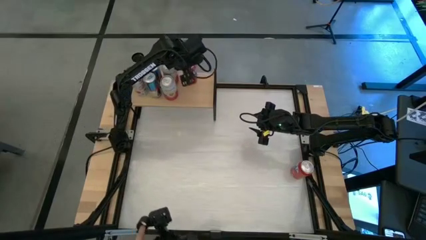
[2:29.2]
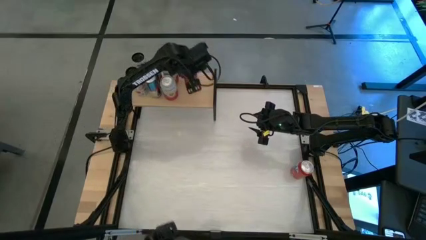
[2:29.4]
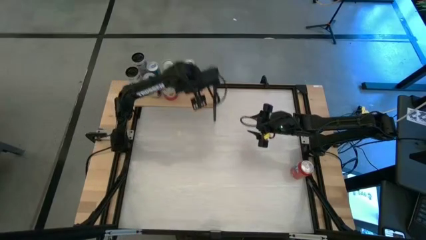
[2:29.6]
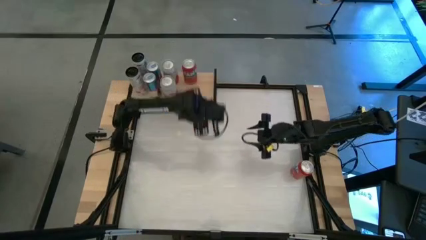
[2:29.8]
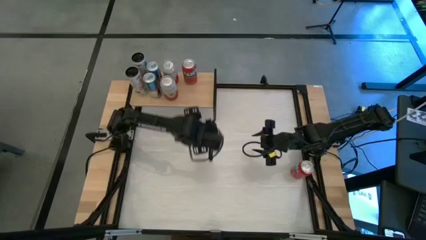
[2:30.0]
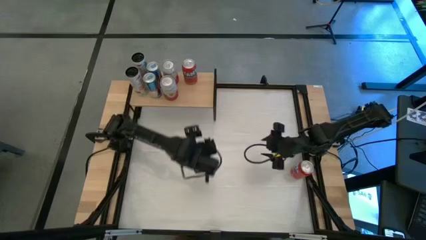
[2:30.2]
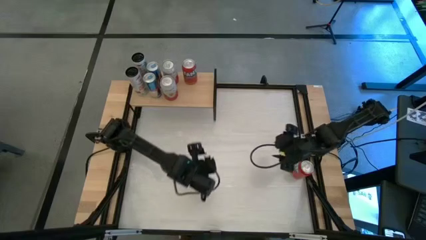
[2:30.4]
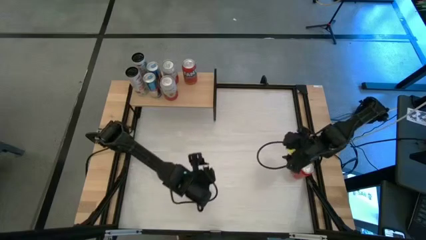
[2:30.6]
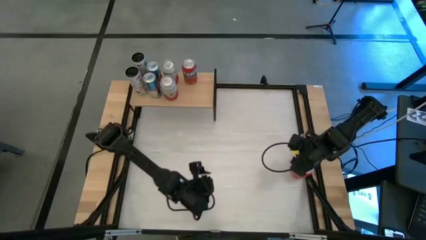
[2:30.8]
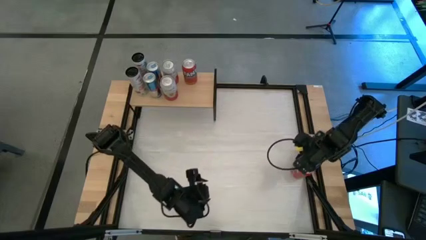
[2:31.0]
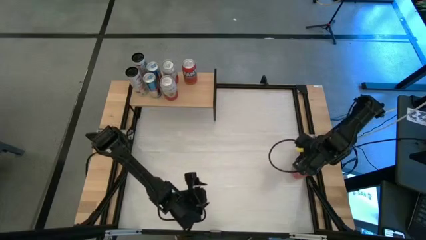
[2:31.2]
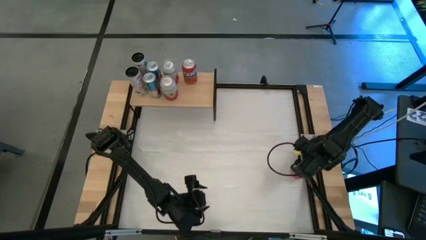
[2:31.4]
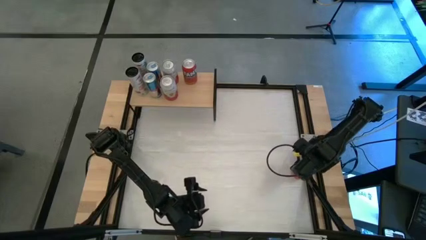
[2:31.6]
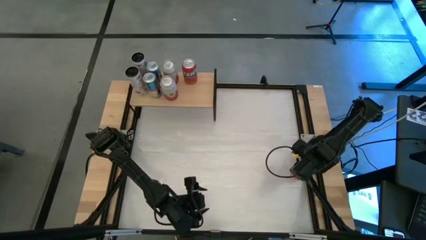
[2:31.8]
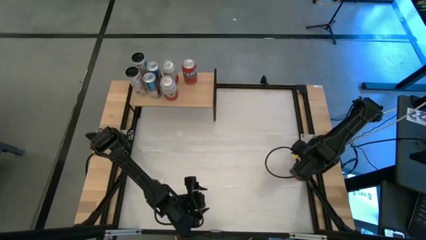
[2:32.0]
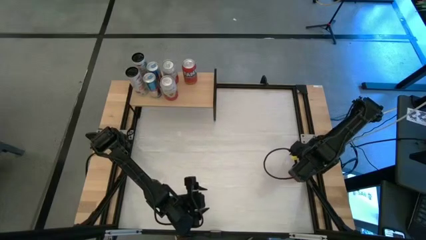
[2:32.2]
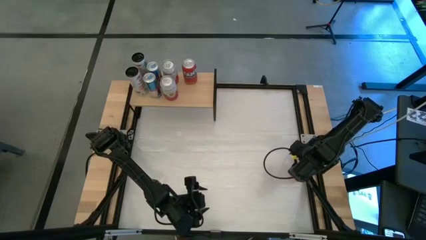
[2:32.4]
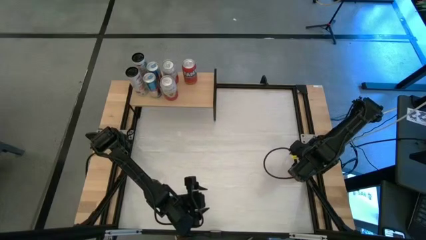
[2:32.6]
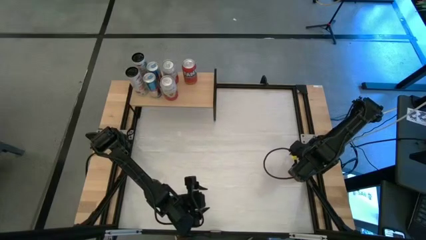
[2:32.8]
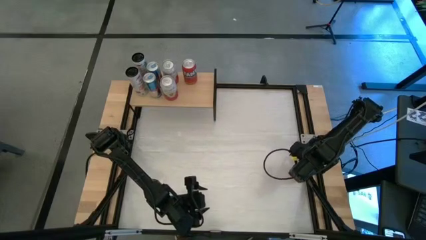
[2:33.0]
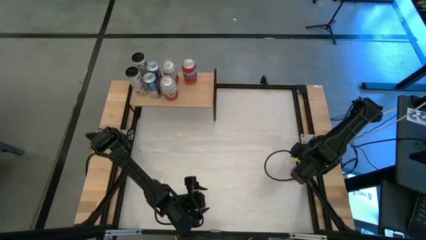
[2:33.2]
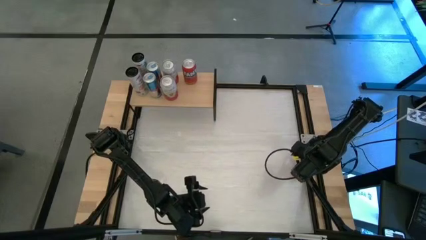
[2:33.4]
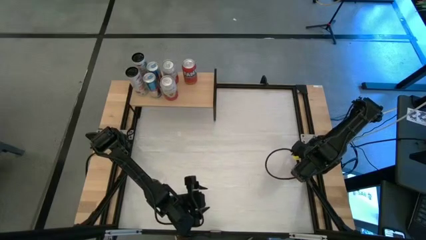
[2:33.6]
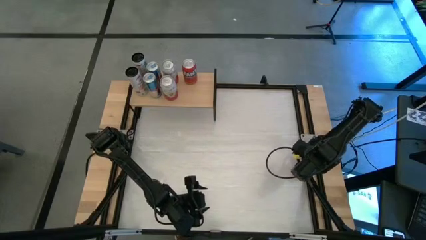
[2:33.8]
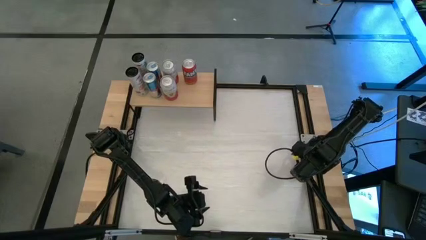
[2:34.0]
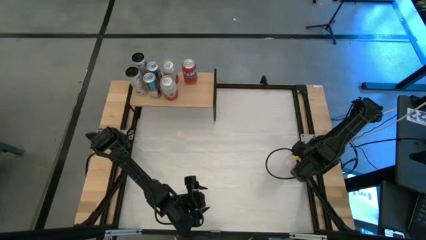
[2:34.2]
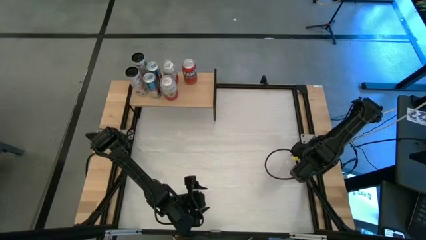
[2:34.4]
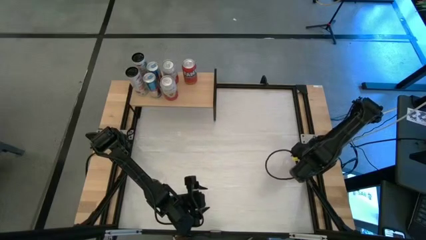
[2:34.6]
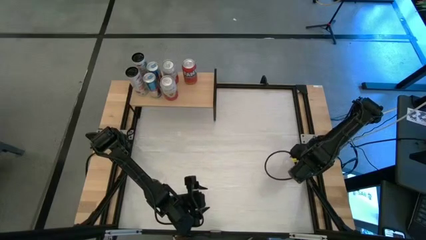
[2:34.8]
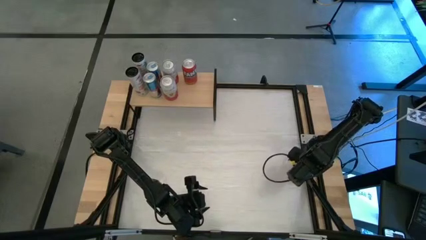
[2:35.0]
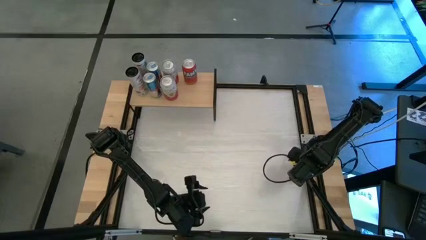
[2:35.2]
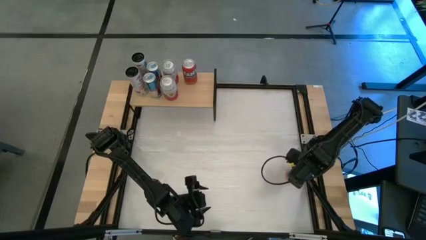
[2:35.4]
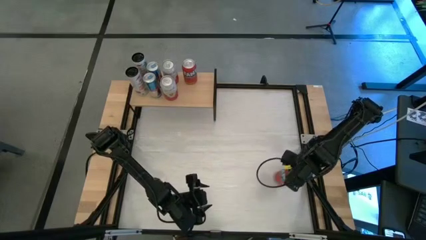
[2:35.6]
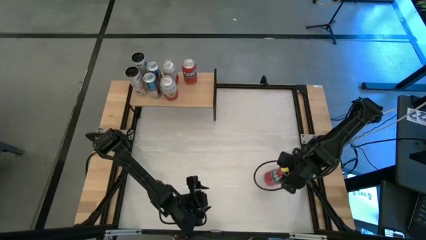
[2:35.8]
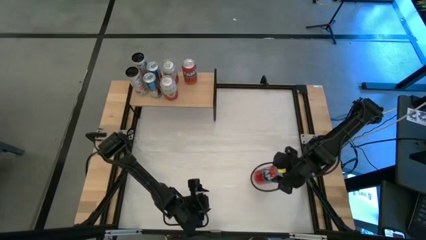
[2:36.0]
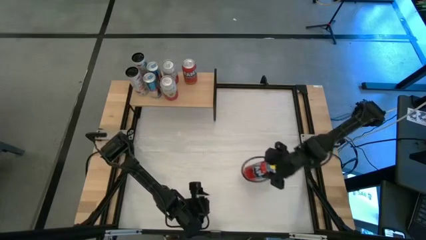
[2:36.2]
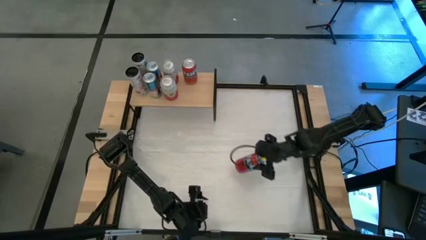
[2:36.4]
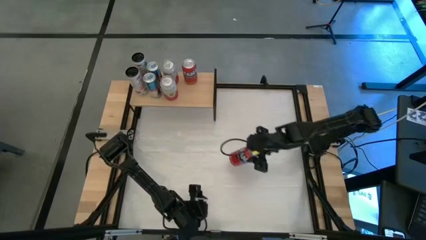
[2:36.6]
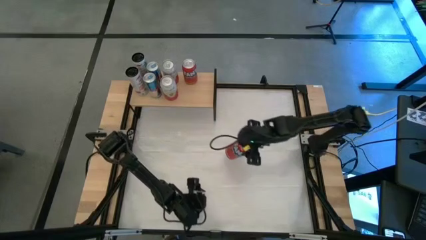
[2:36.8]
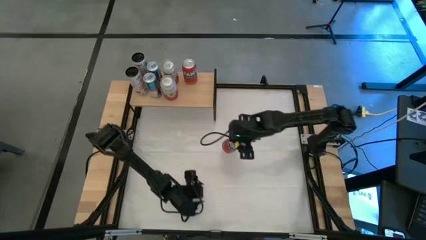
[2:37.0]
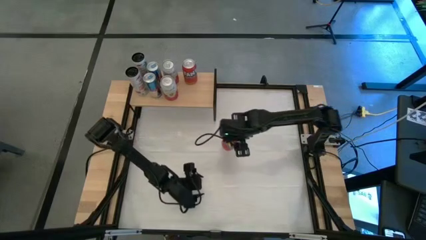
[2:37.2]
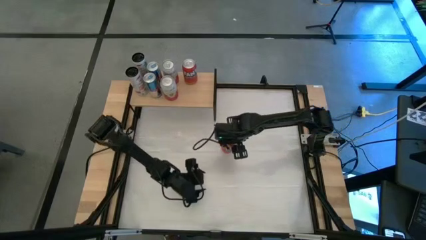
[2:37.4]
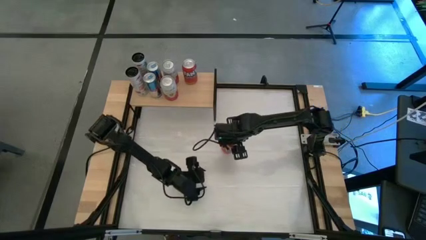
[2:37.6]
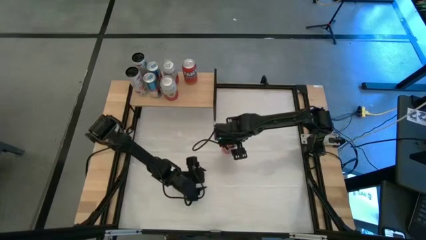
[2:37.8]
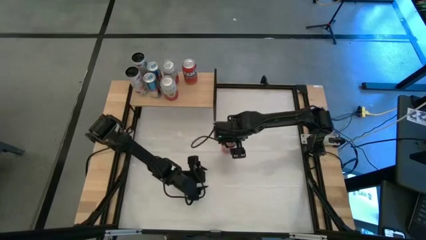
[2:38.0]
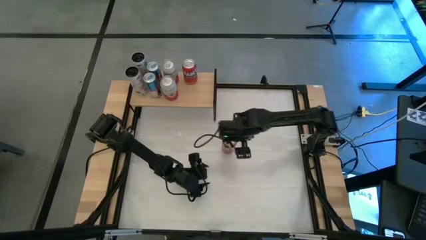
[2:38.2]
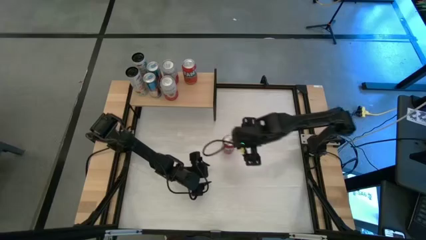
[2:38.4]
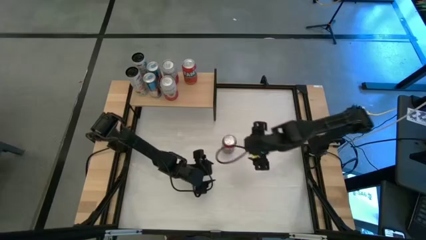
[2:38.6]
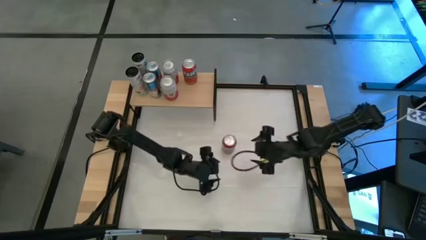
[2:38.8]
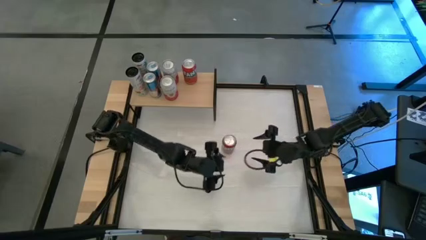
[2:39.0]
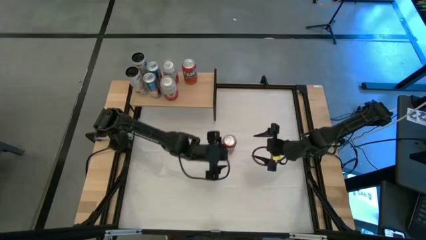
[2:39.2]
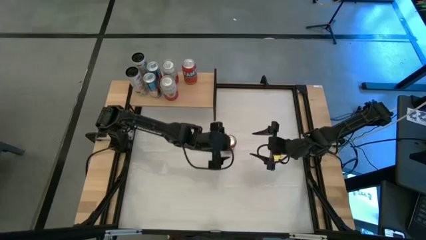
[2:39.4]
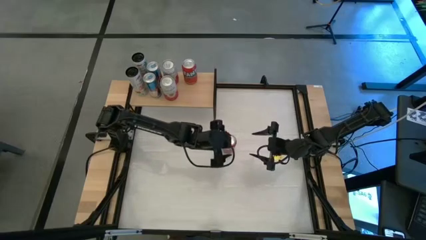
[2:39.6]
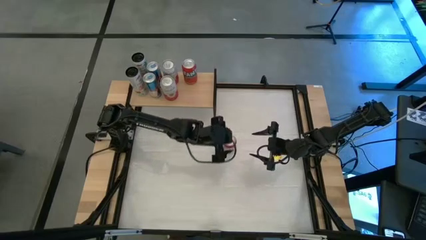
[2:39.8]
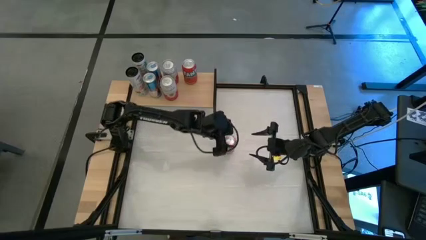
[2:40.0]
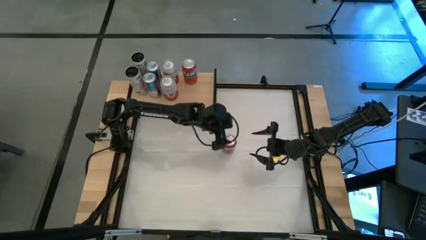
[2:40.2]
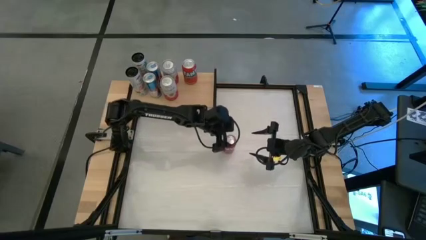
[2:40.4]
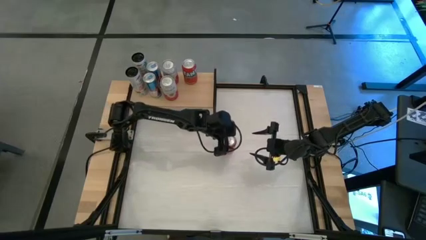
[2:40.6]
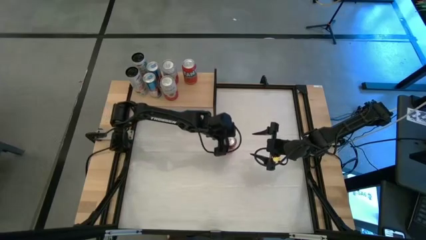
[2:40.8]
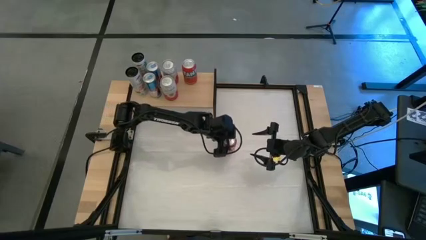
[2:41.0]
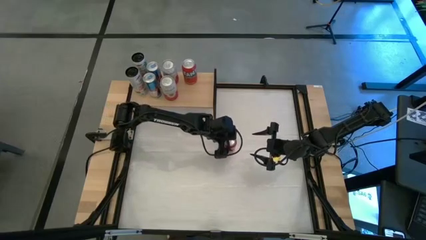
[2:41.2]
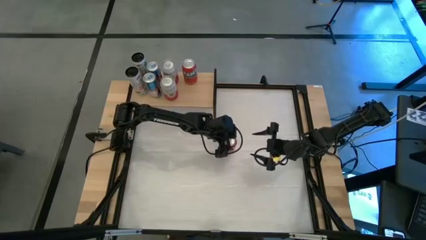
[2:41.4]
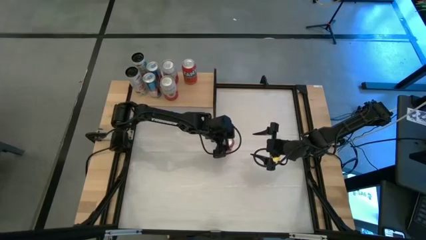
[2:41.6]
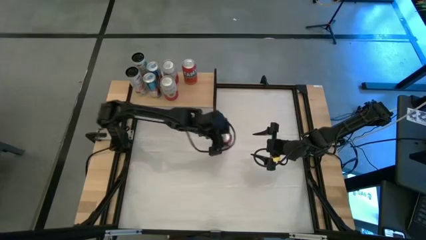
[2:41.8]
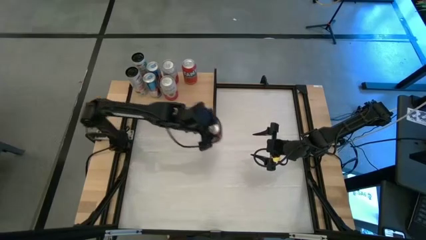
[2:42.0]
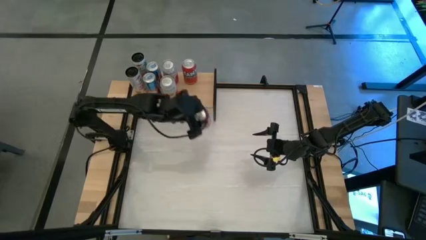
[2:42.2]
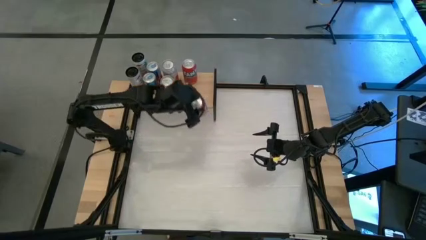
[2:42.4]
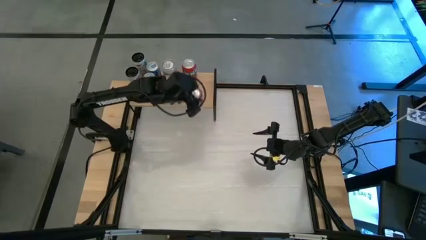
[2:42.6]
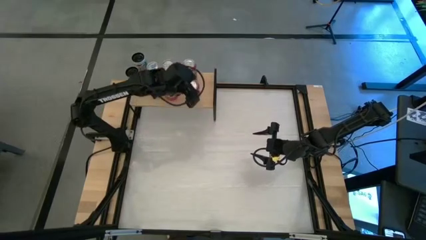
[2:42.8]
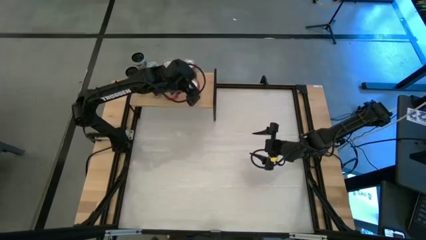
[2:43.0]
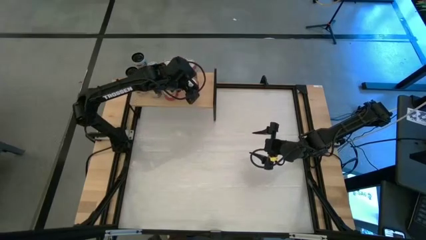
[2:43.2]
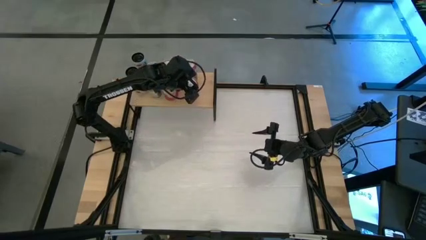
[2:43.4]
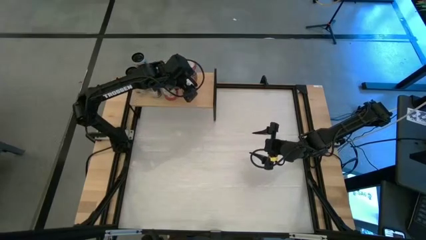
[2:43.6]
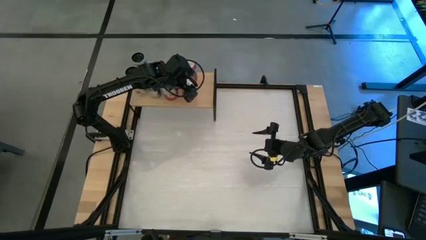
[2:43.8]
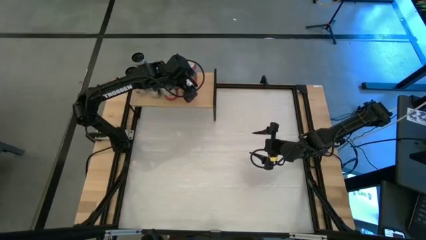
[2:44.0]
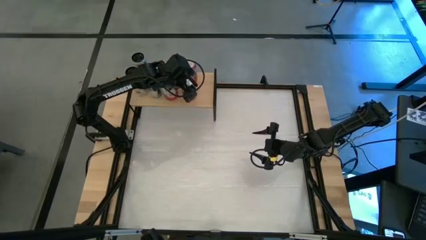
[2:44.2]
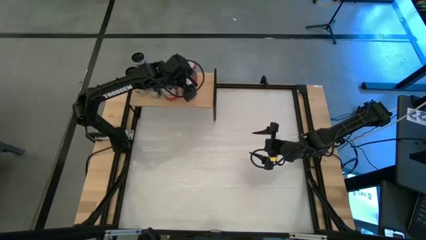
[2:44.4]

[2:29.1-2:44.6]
Task: Place canned beverage on shelf
Put the red soda can on the shelf aligned with the red soda can

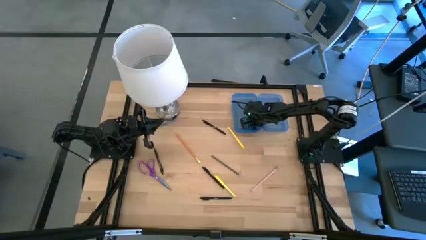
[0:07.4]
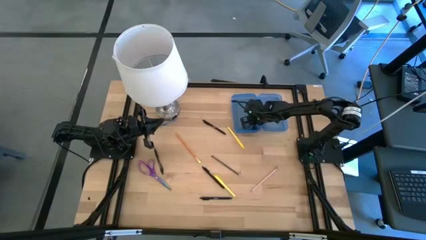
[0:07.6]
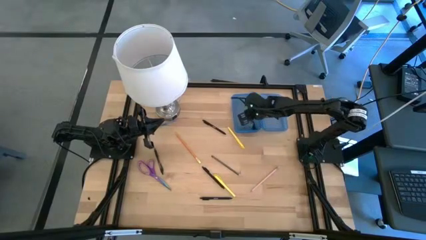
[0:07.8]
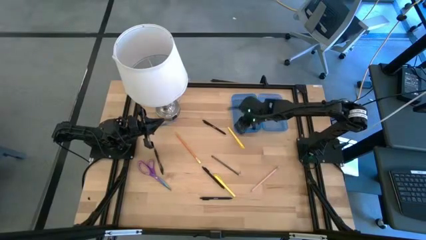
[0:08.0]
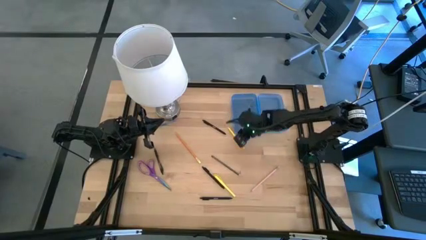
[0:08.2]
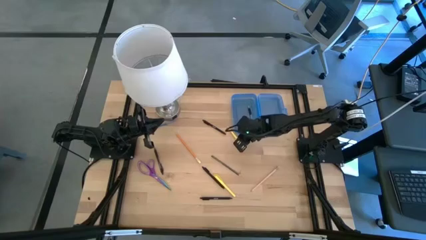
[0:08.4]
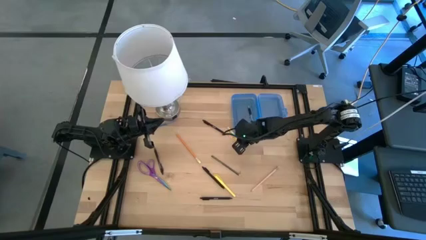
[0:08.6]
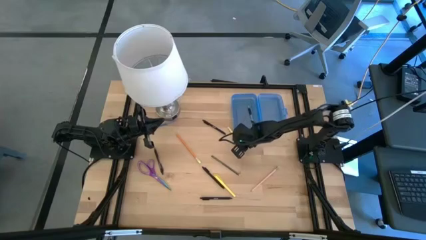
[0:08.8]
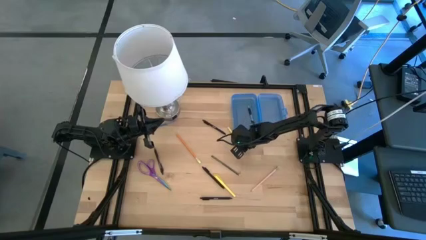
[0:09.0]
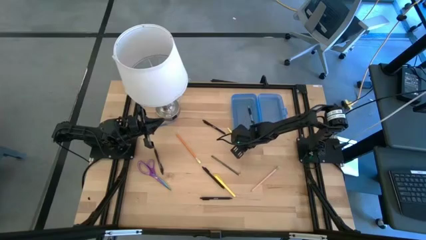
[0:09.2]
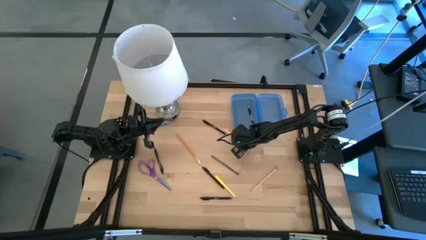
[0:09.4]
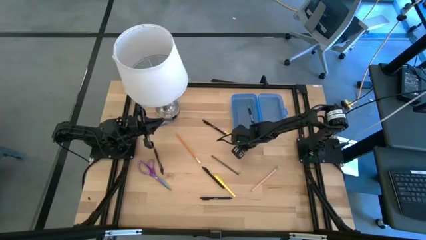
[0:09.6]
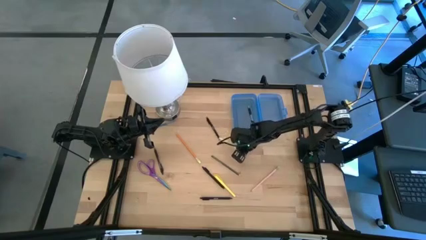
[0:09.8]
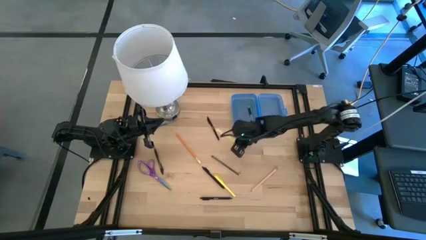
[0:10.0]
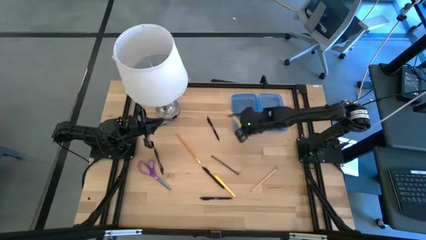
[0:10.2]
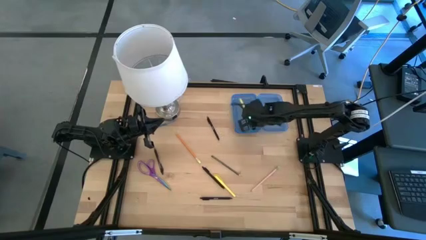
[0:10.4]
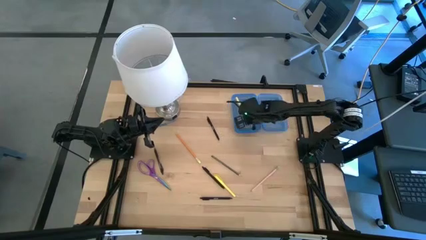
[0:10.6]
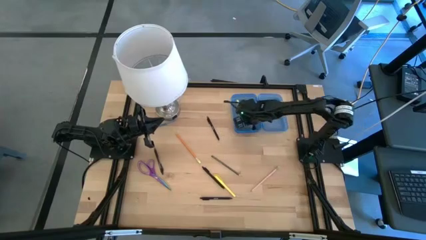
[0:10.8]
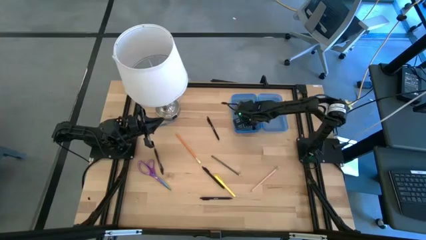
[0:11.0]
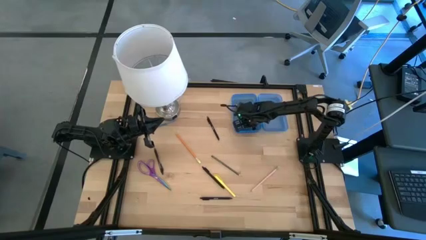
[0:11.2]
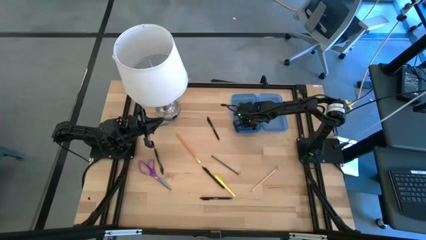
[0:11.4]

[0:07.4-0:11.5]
Task: Pick & place school supplies into a supply box
Put the top yellow pen into the blue supply box
